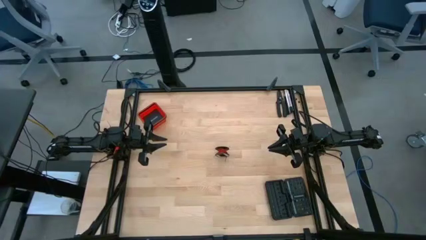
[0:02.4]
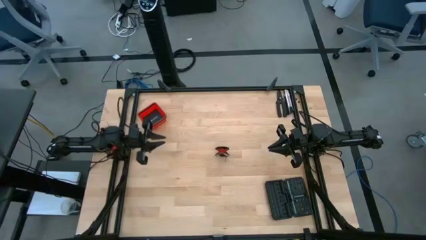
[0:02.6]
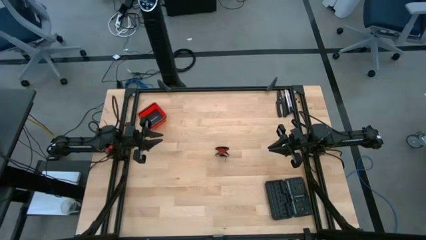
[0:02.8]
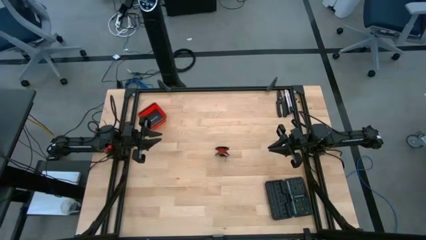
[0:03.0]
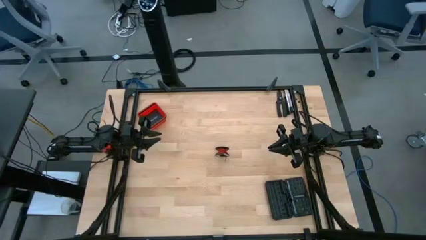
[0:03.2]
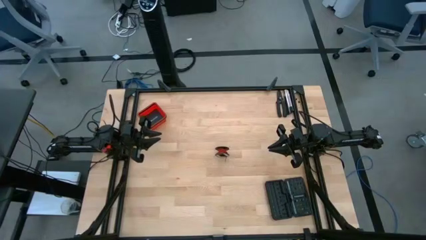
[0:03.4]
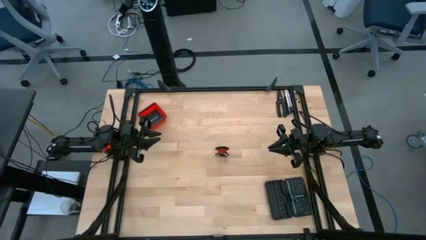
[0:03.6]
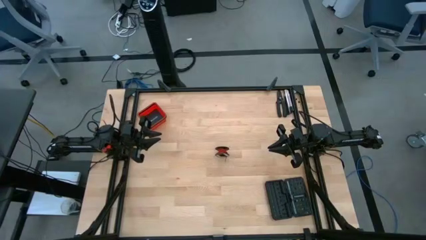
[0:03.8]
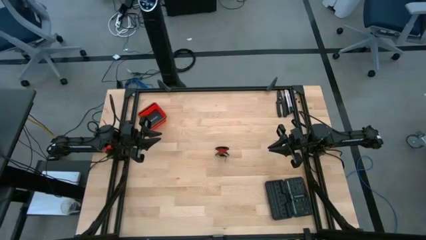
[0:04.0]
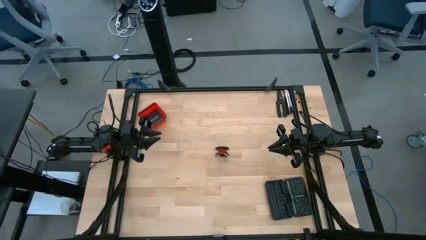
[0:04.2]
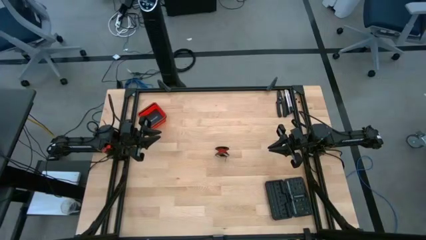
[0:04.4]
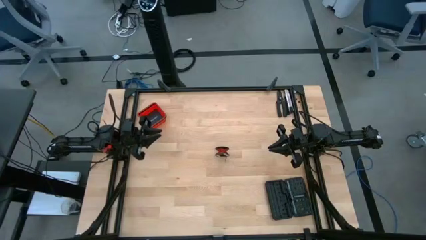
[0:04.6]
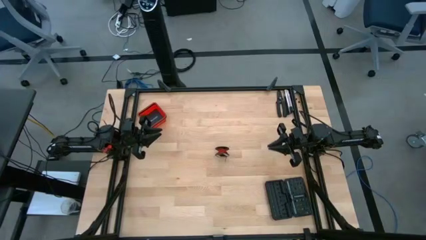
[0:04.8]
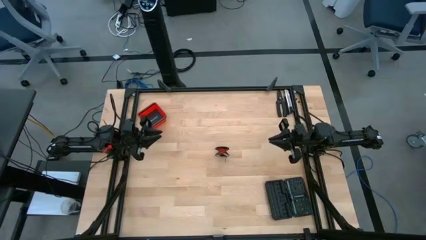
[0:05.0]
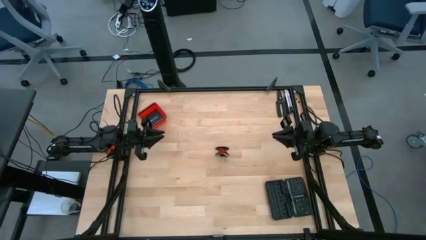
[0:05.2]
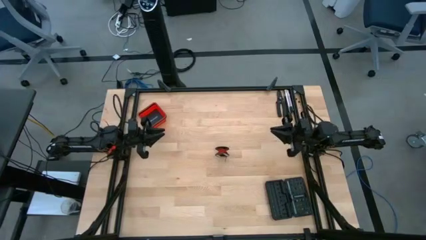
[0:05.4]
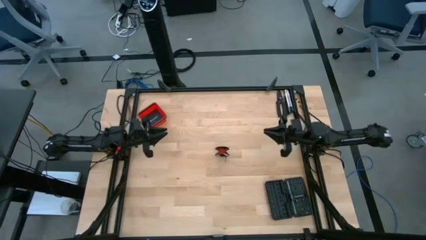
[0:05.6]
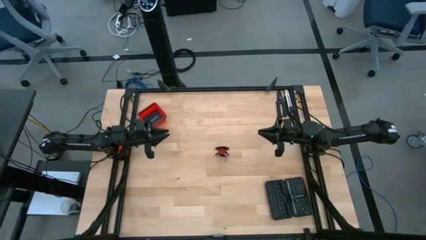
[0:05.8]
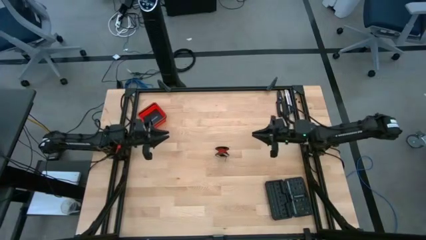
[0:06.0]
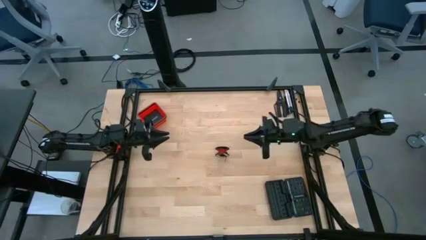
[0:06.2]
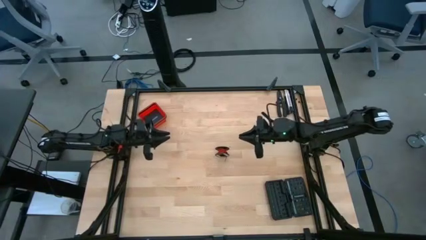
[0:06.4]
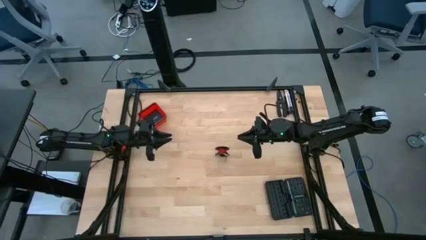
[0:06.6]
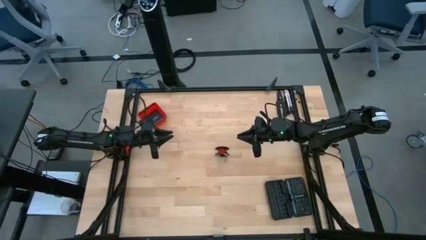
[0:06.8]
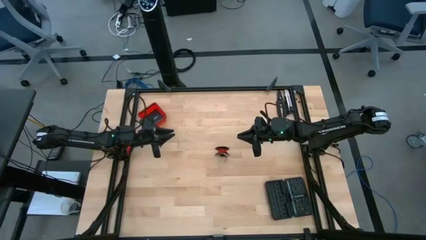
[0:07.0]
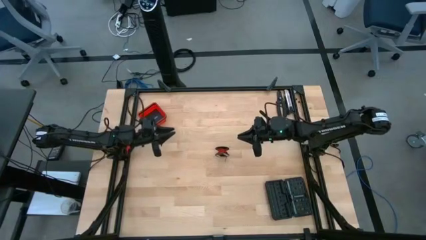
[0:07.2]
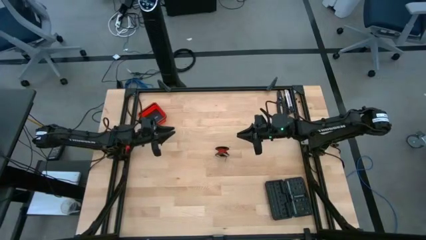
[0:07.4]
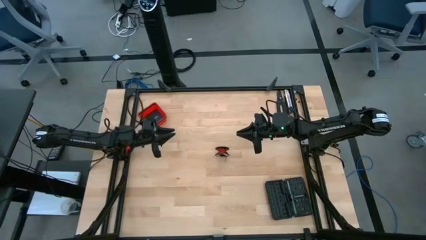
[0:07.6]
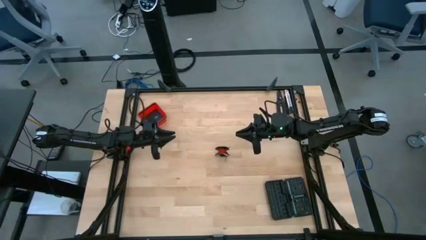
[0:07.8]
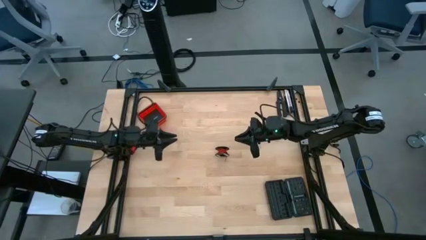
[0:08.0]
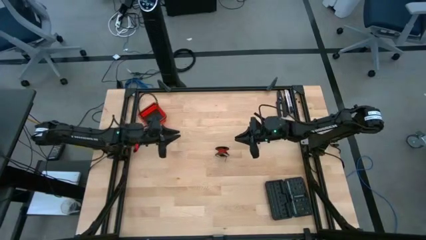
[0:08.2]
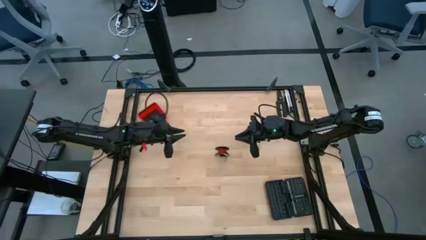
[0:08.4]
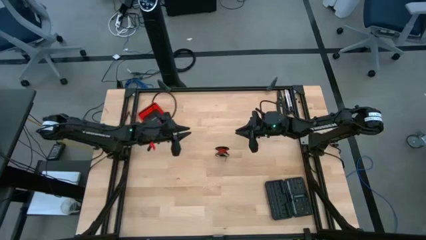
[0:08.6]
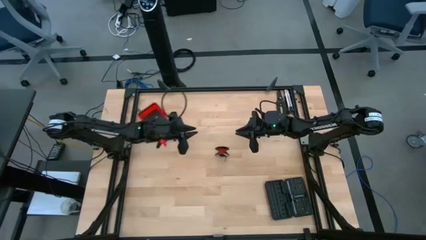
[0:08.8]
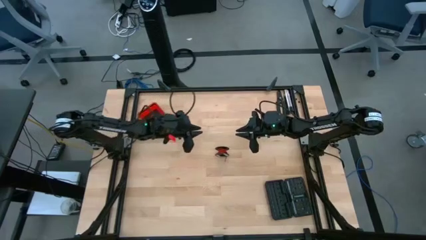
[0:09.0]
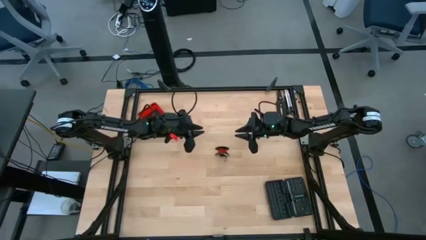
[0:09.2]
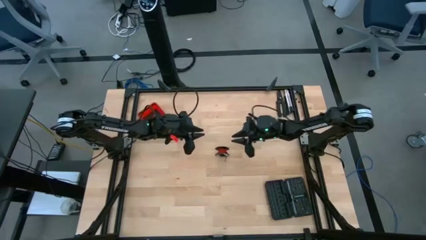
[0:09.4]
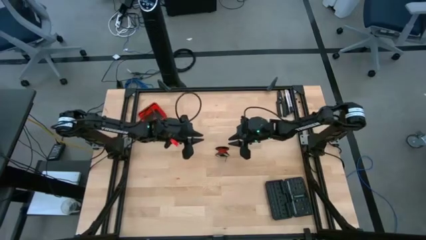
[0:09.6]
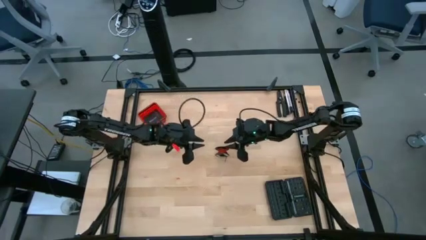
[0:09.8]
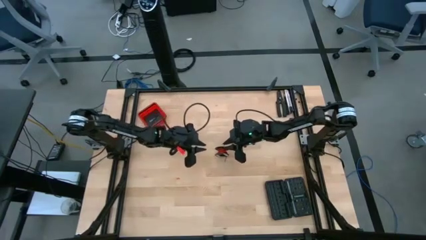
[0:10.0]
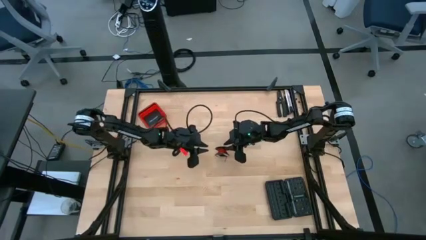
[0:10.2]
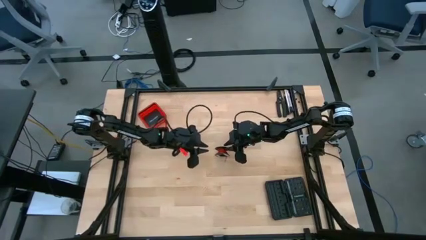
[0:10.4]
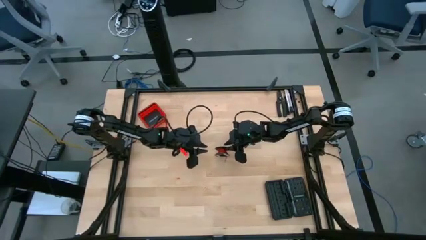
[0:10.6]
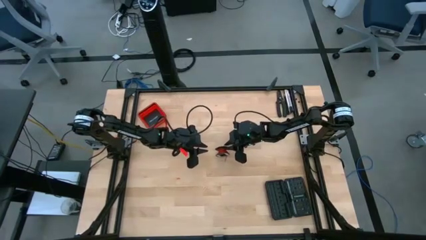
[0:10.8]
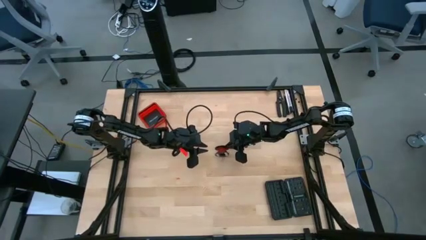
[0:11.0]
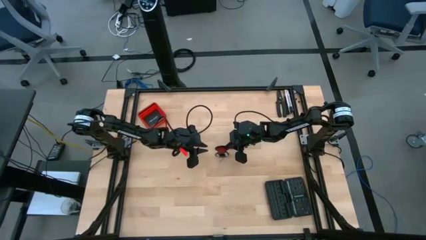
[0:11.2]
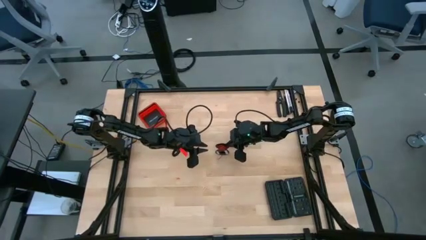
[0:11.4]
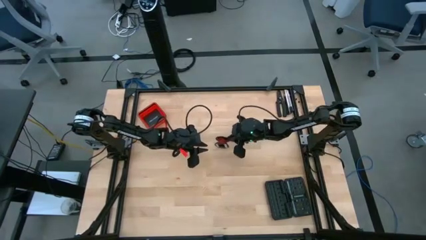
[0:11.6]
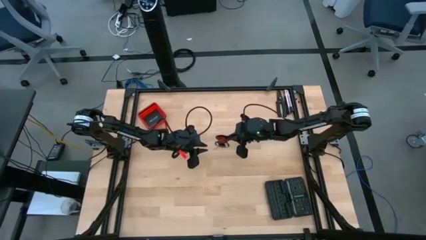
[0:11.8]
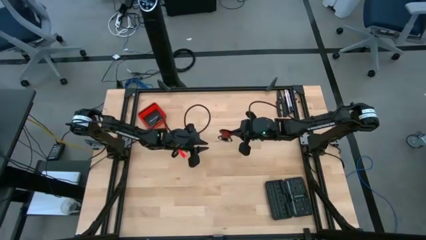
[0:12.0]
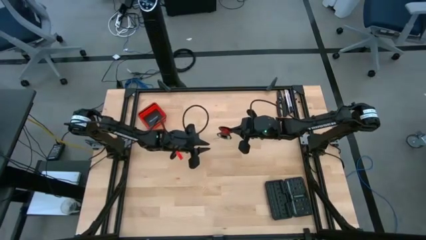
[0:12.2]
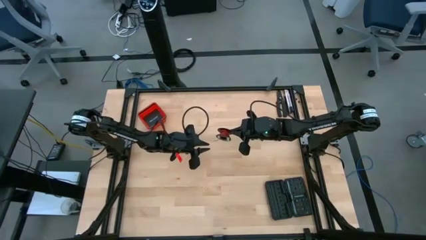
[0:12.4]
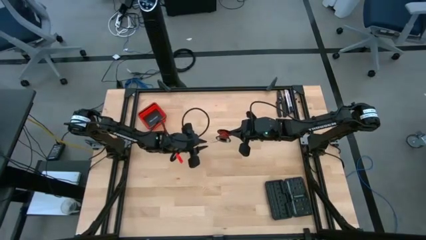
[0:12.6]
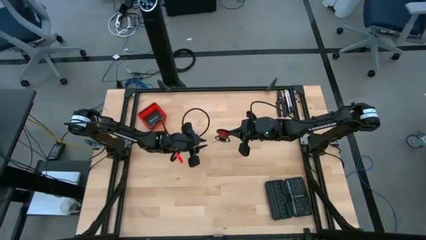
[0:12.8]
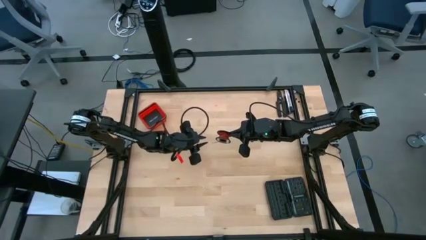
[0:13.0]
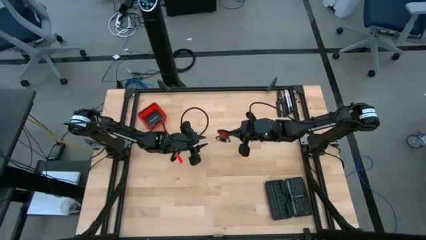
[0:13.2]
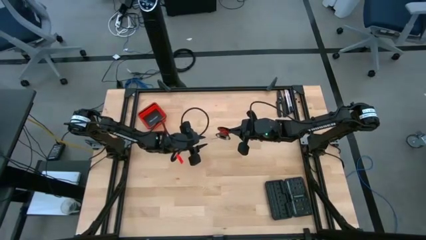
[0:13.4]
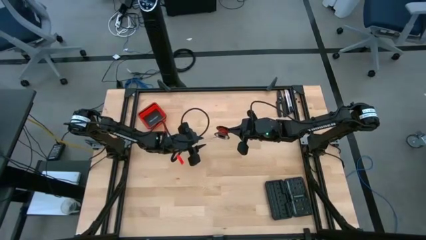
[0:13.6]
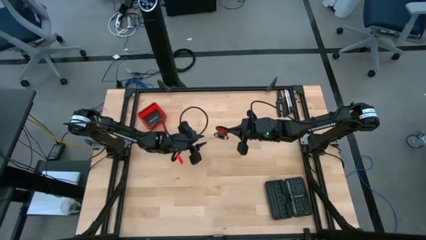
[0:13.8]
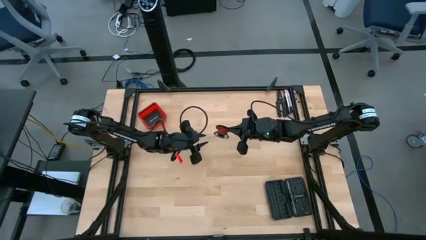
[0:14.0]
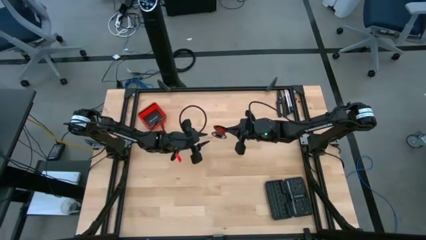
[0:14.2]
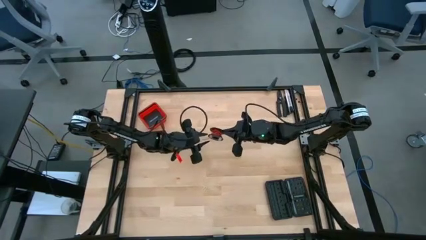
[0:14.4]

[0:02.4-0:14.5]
Task: Coil cords
Uncoil the wire to the spool
